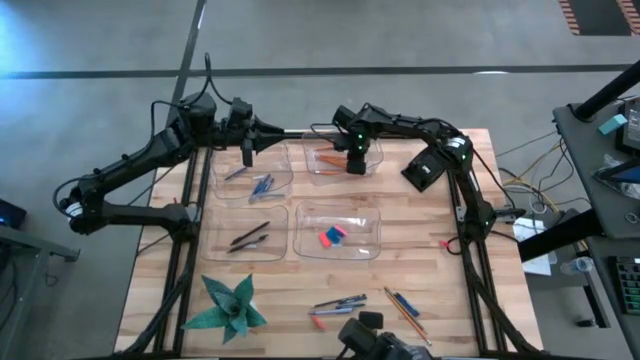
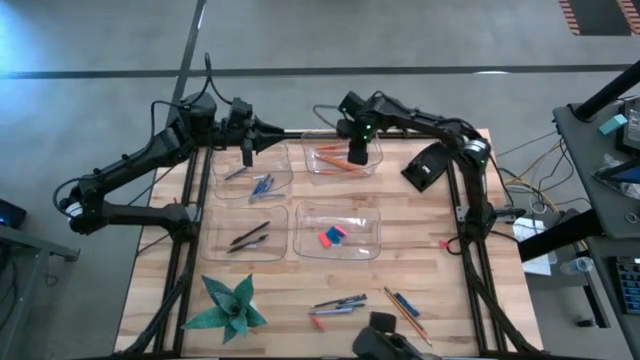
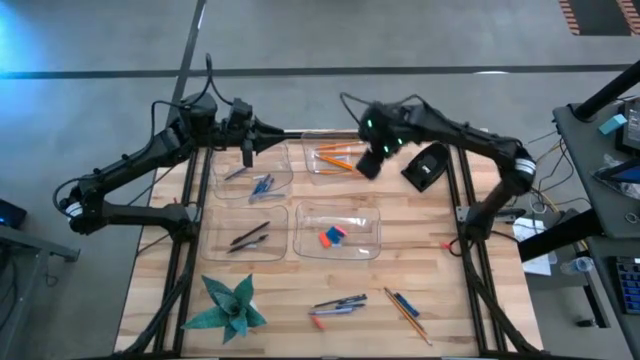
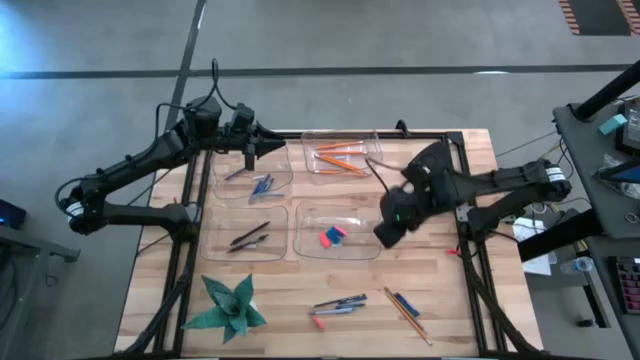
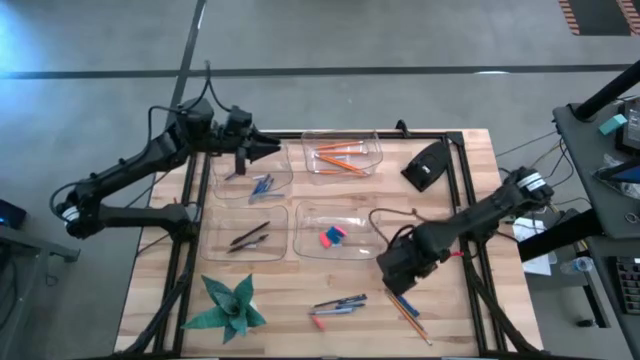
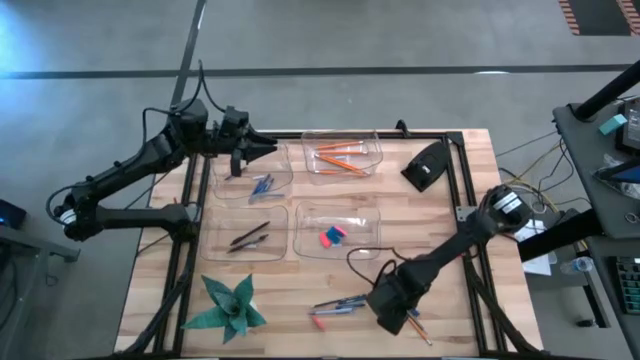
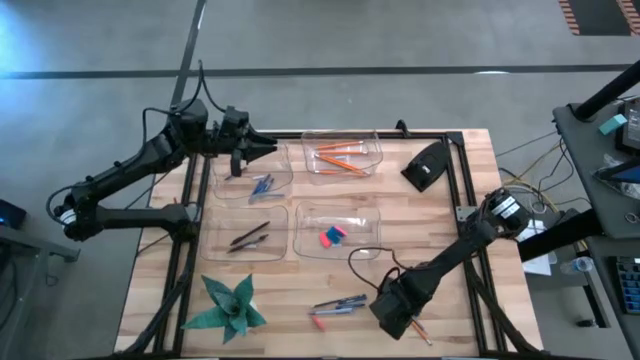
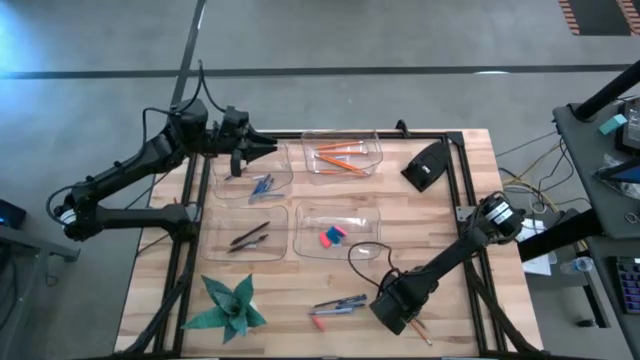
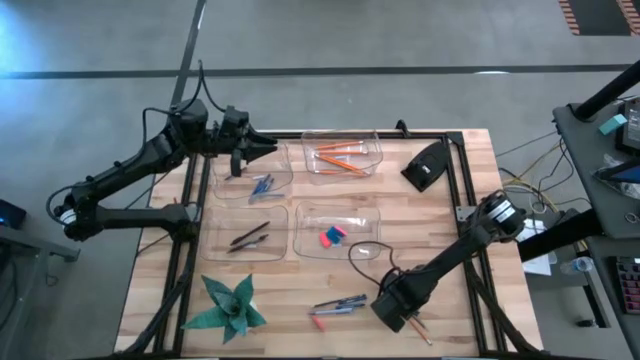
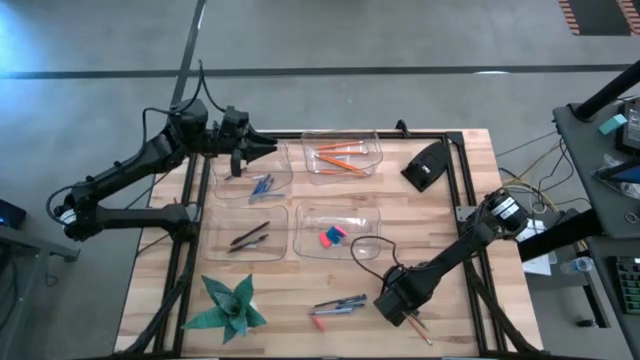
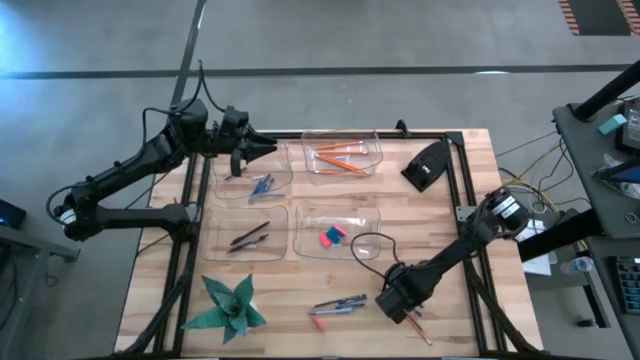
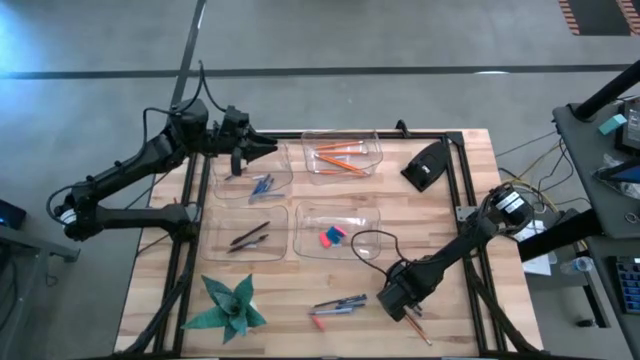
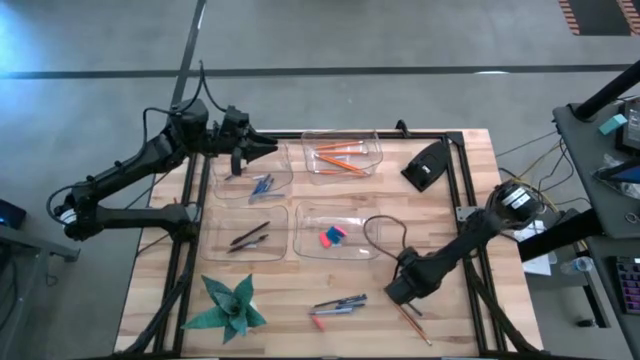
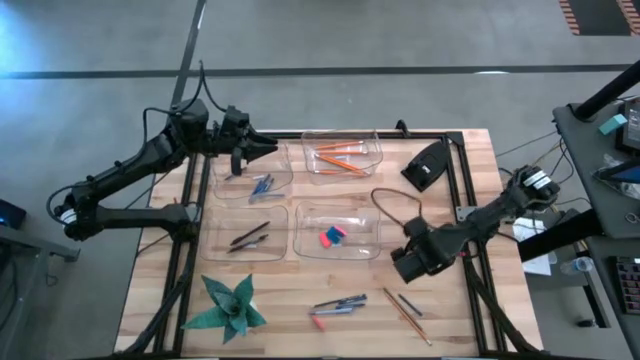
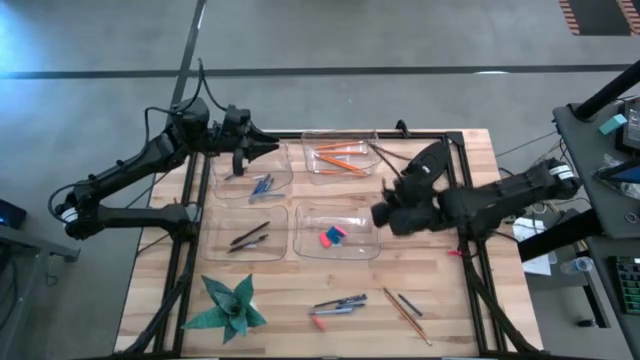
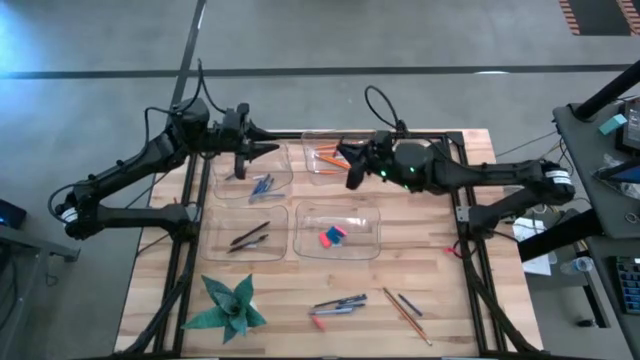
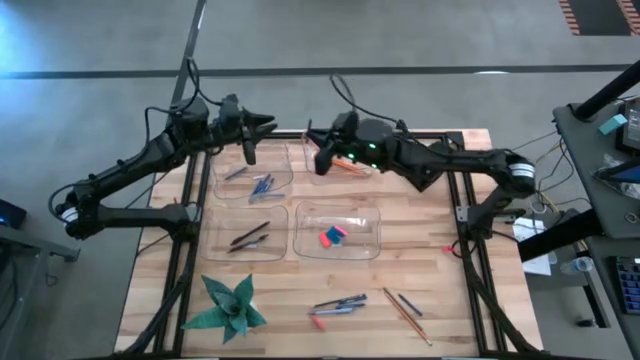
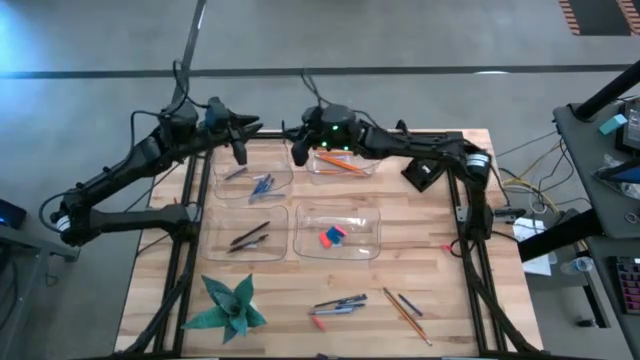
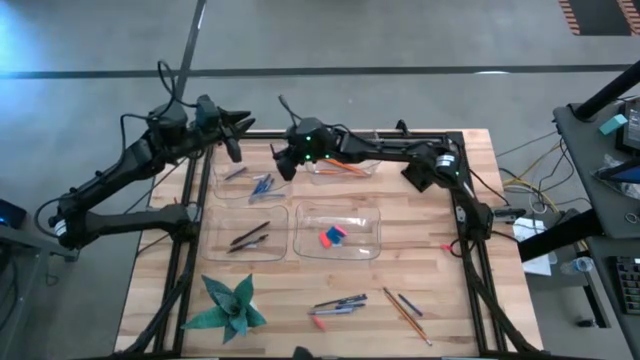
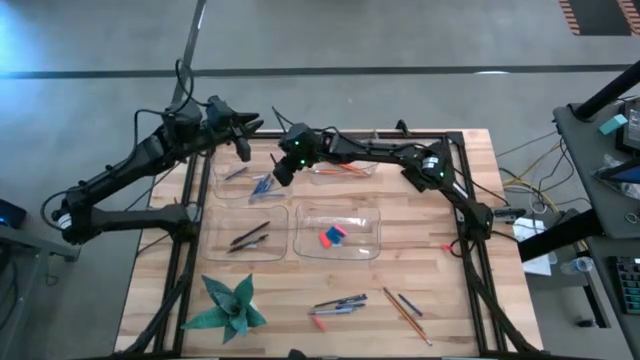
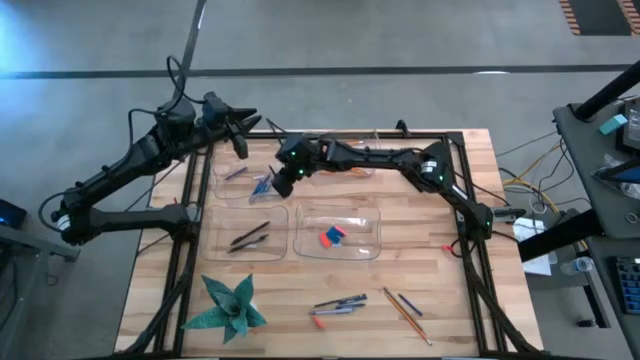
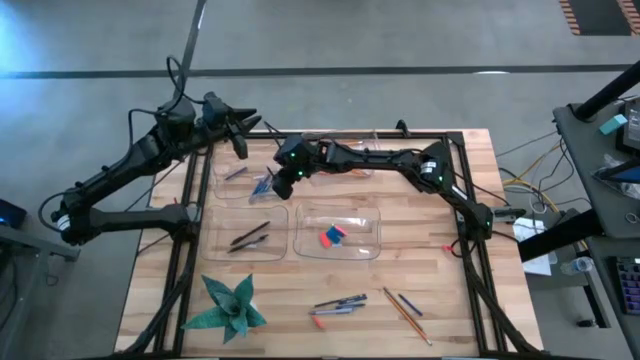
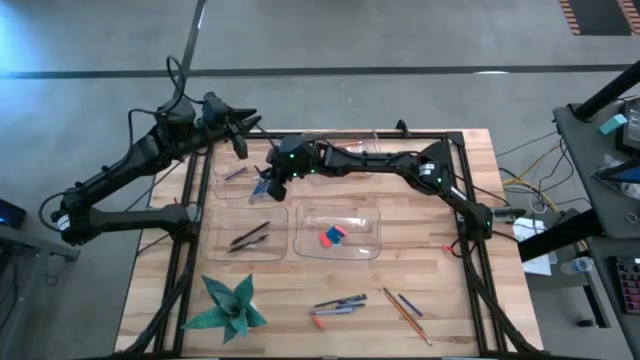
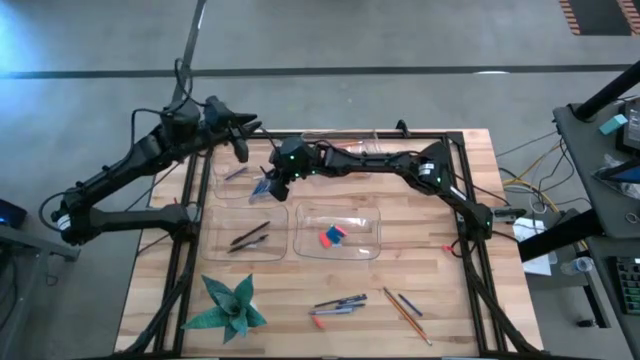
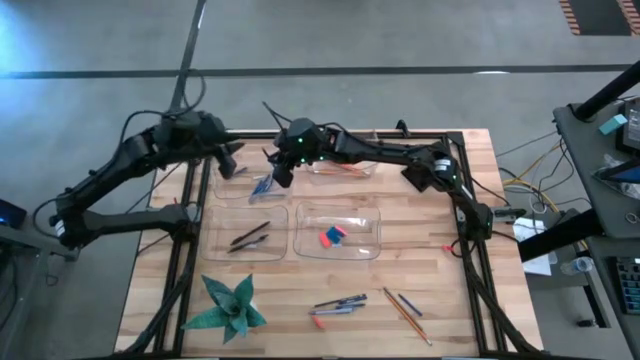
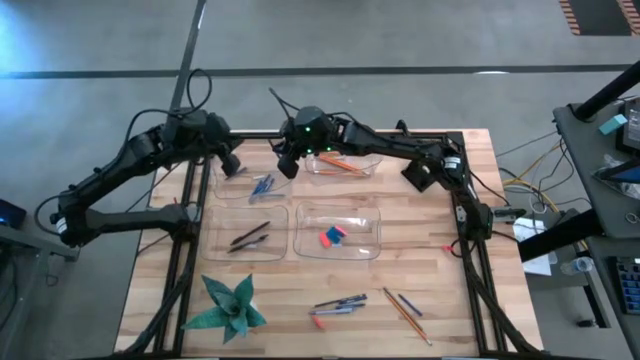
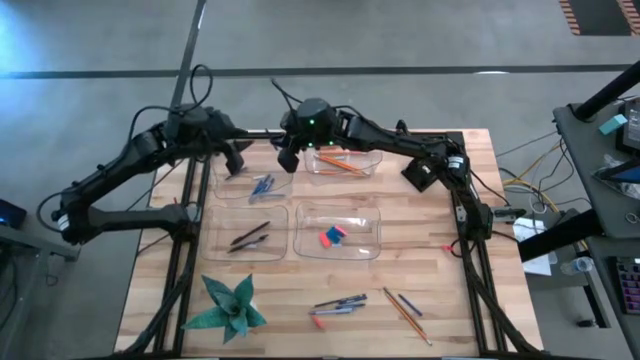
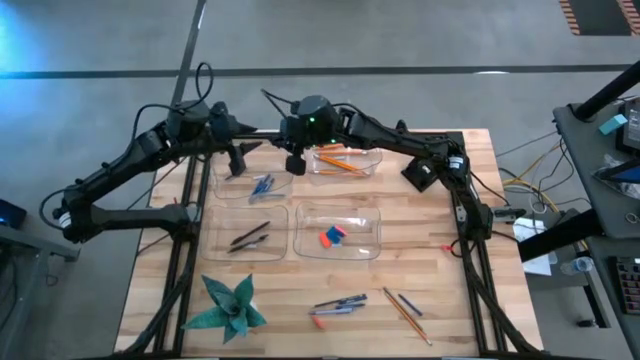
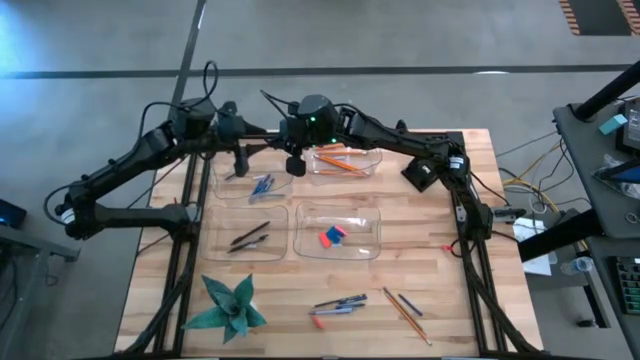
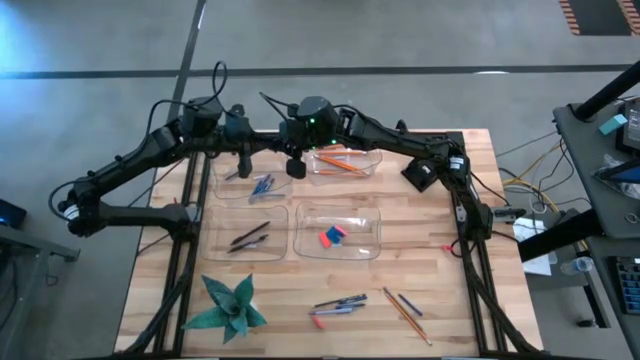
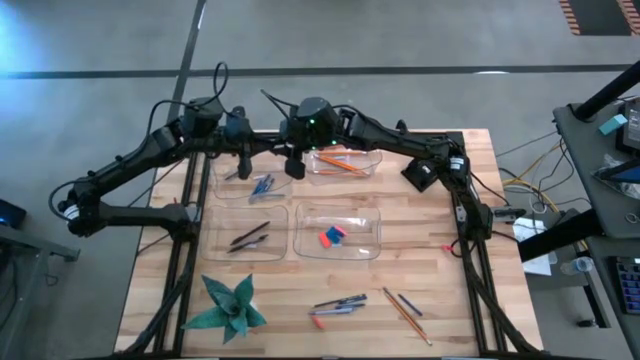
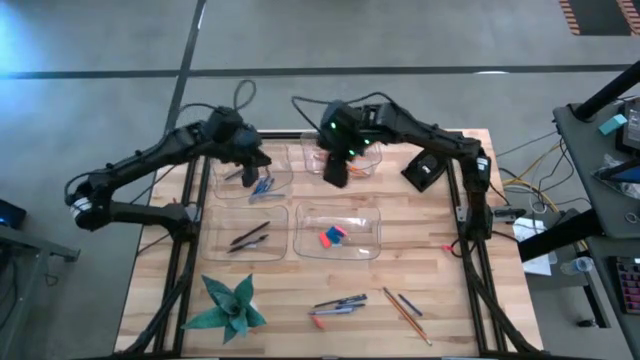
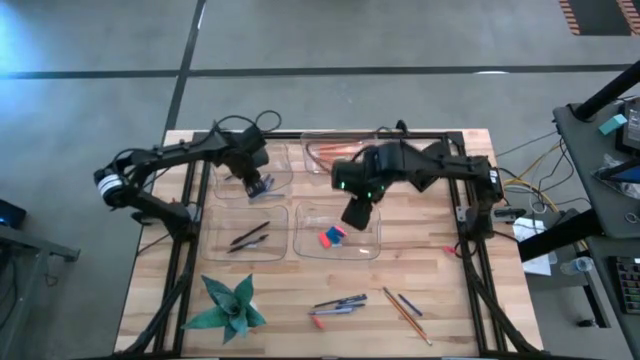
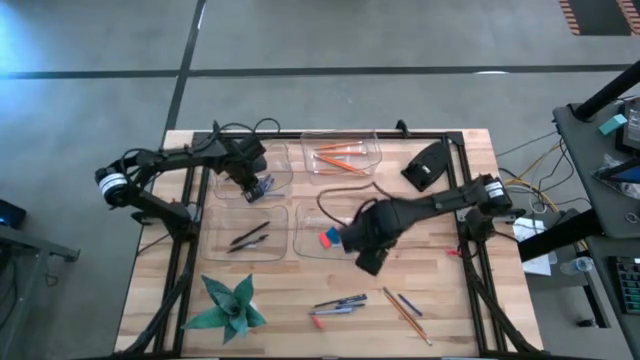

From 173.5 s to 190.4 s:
Task: Sort crayons/erasers/pens/pencils in bins
Put the blue crayon into the top left transparent bin

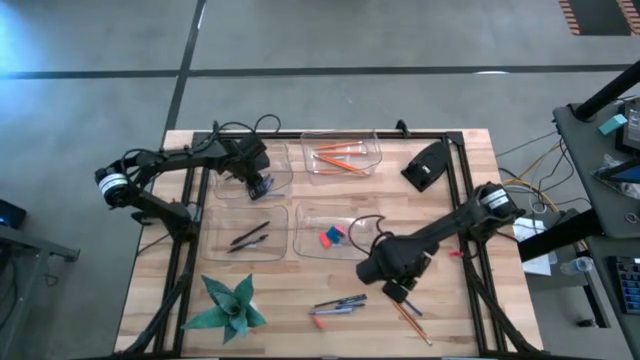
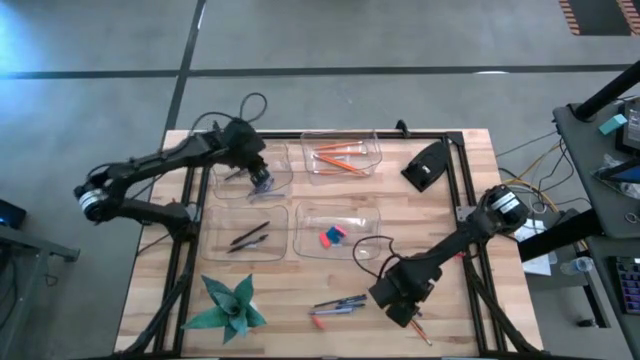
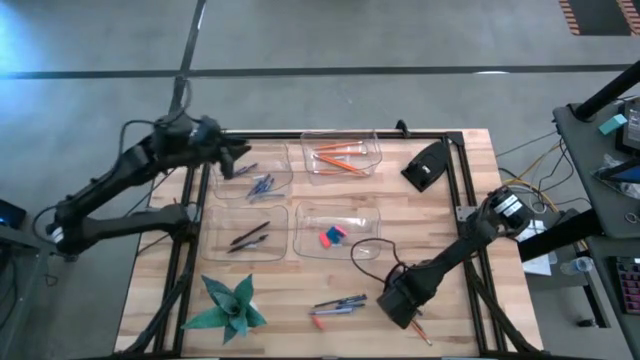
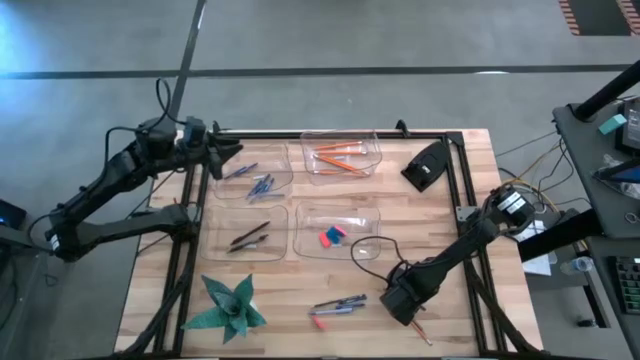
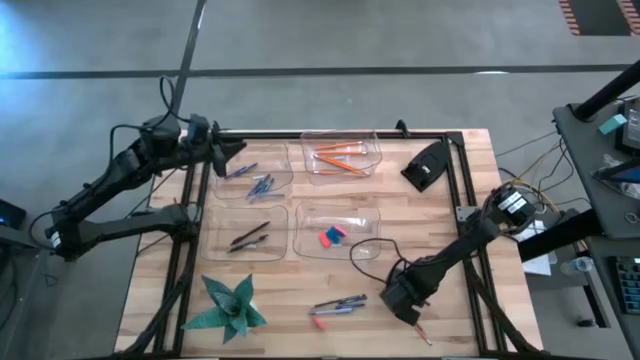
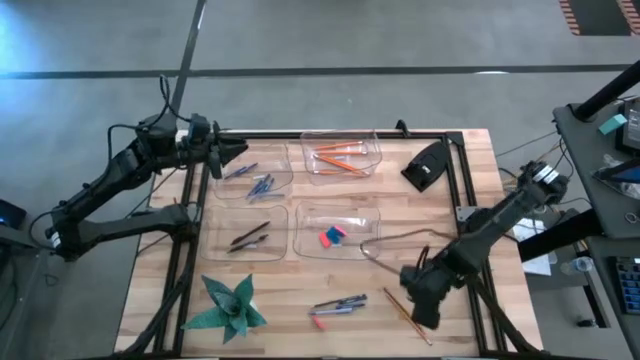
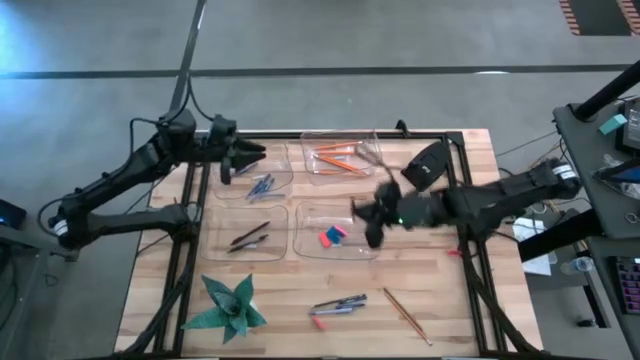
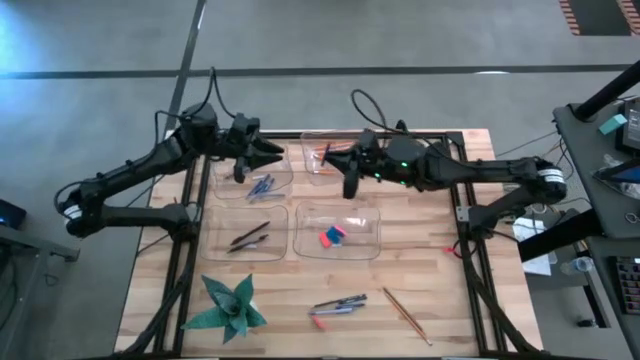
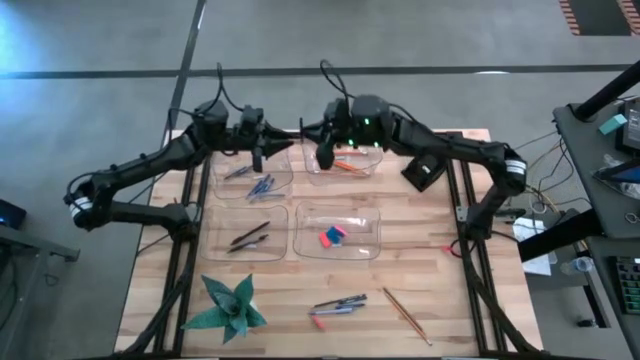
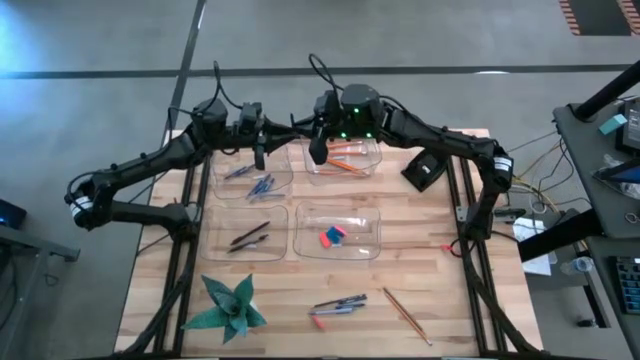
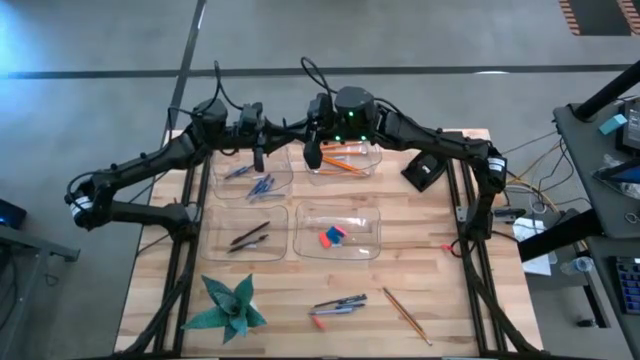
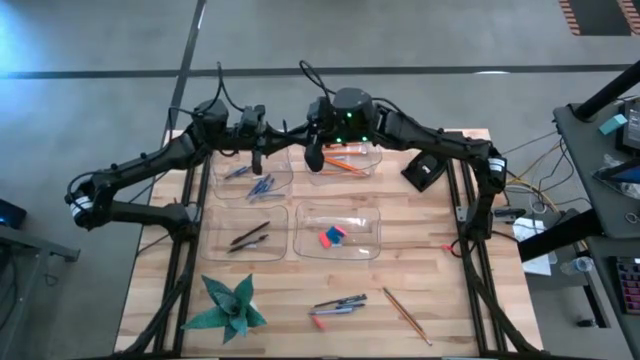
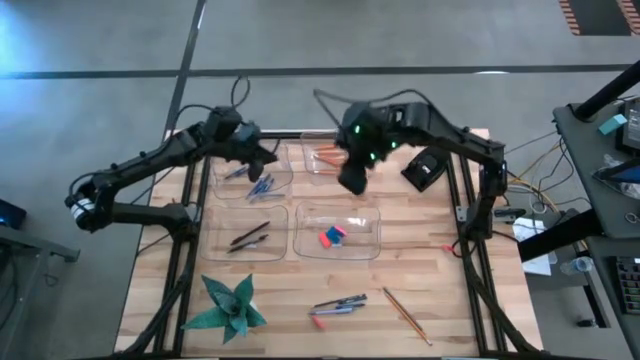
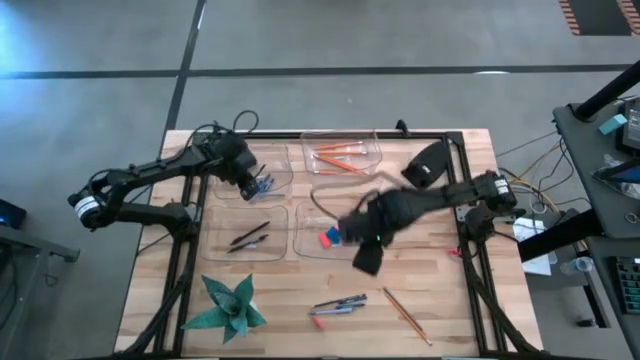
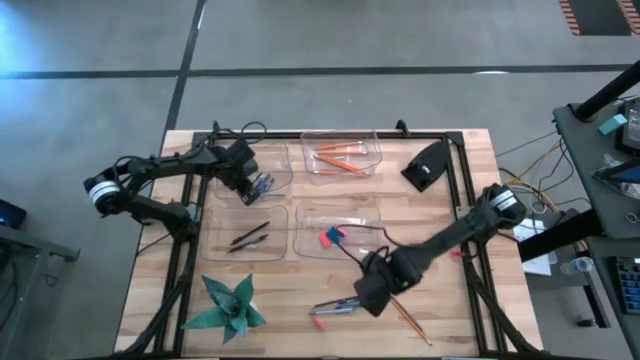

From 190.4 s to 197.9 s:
Put the blue crayon into the top left transparent bin
